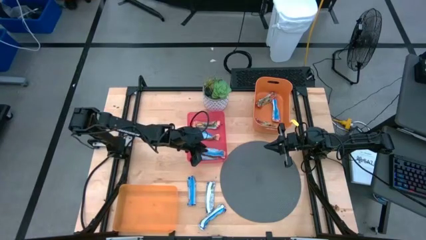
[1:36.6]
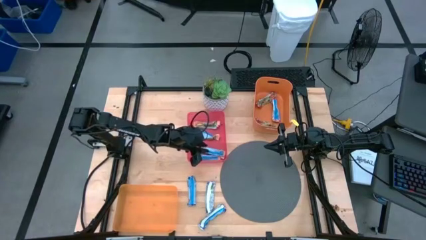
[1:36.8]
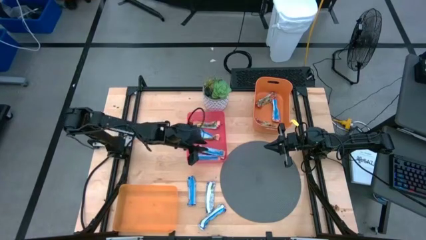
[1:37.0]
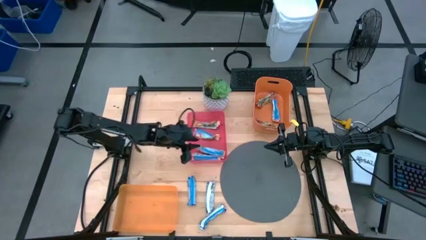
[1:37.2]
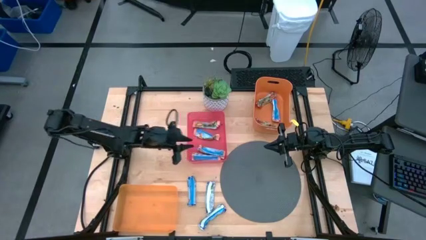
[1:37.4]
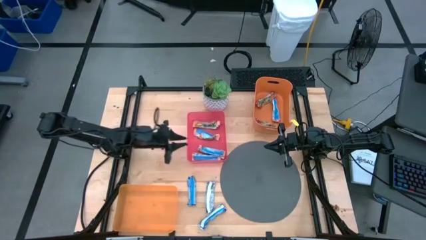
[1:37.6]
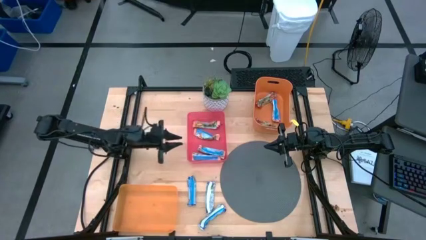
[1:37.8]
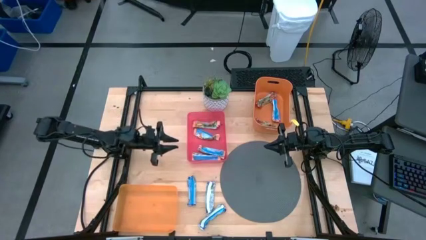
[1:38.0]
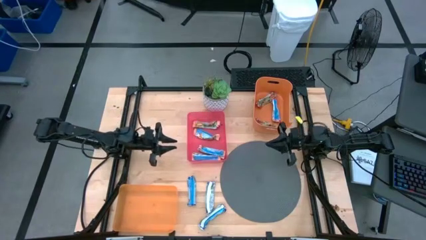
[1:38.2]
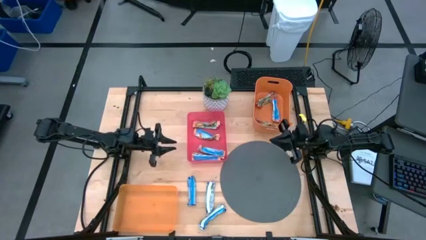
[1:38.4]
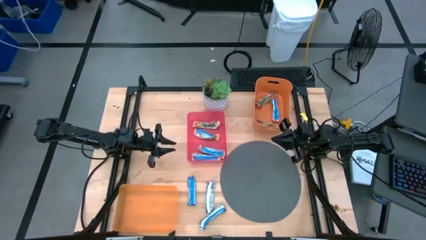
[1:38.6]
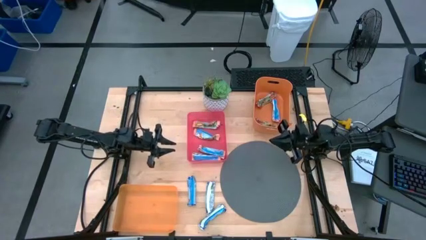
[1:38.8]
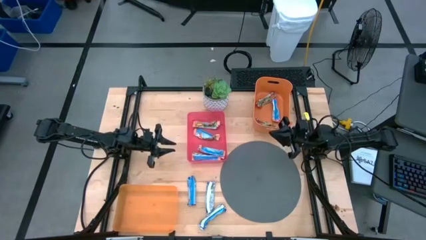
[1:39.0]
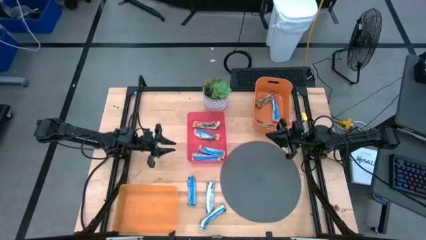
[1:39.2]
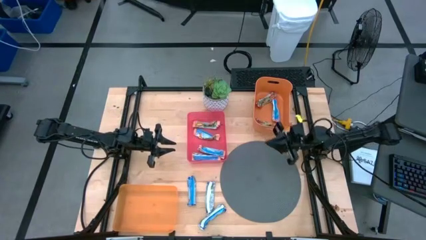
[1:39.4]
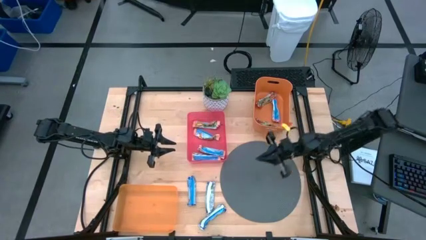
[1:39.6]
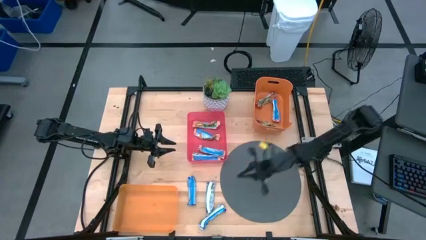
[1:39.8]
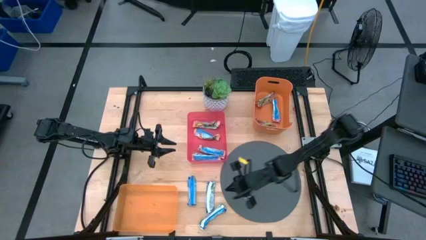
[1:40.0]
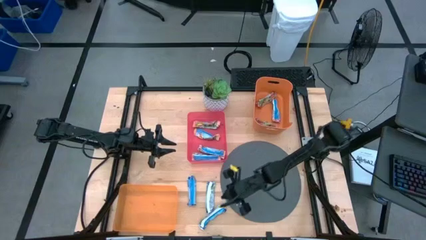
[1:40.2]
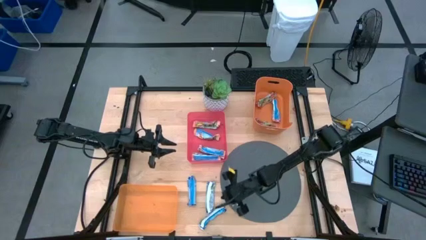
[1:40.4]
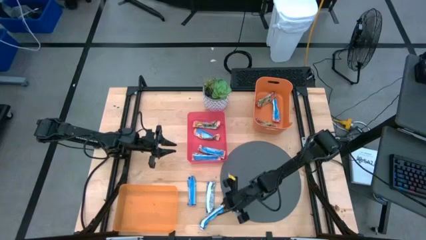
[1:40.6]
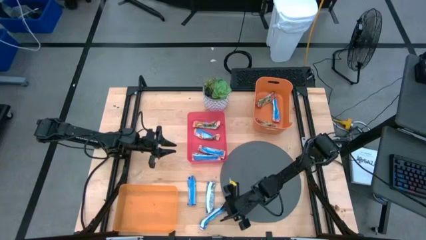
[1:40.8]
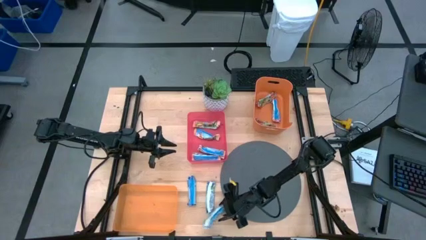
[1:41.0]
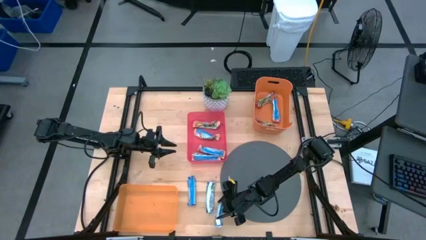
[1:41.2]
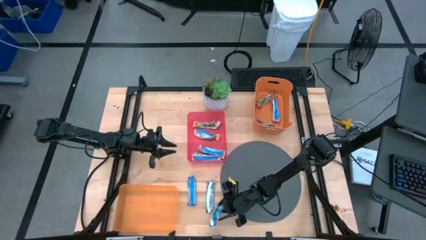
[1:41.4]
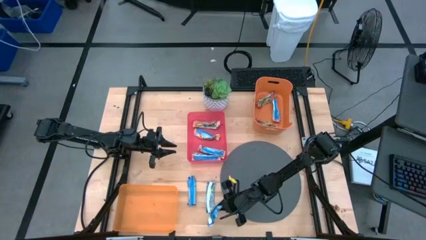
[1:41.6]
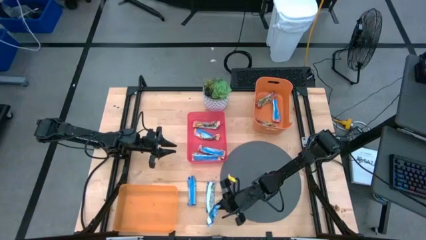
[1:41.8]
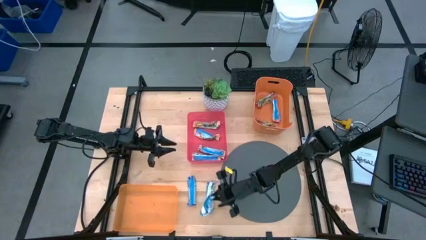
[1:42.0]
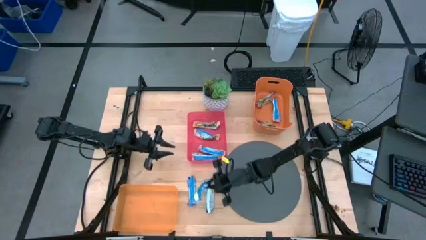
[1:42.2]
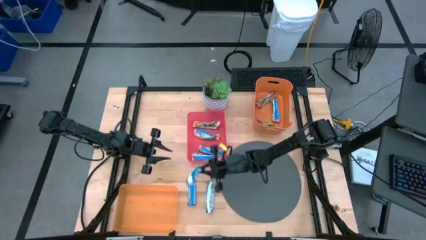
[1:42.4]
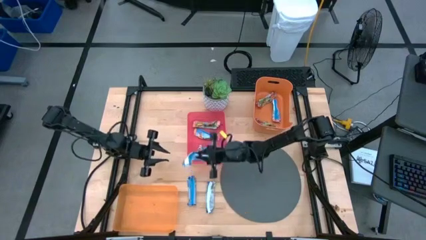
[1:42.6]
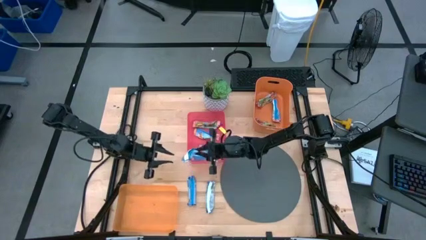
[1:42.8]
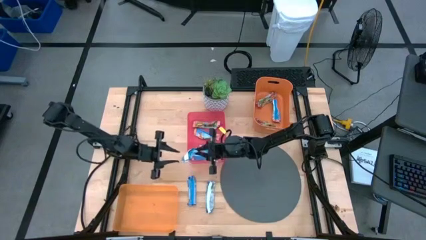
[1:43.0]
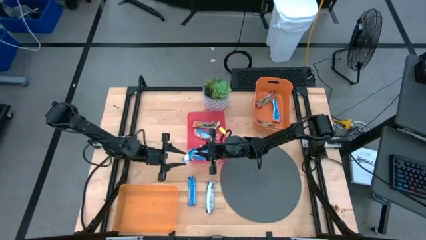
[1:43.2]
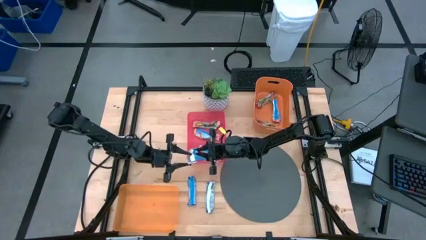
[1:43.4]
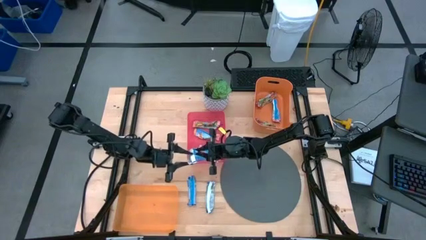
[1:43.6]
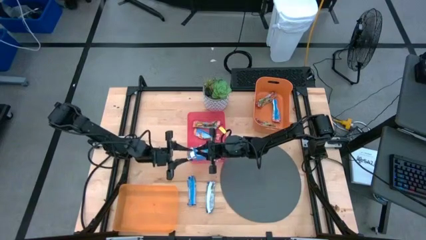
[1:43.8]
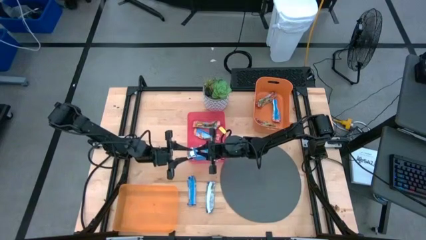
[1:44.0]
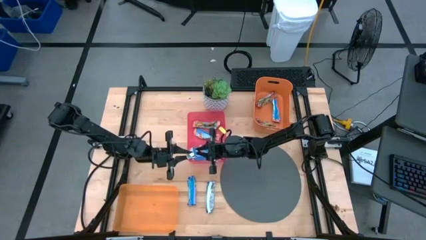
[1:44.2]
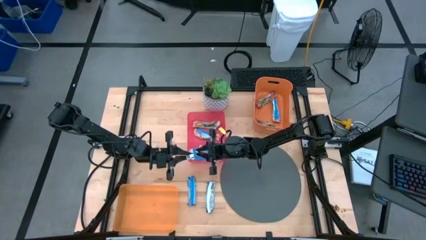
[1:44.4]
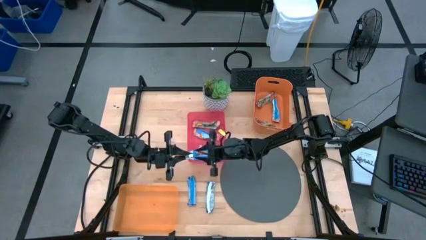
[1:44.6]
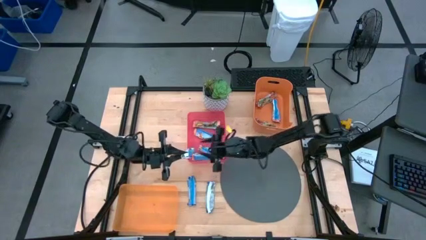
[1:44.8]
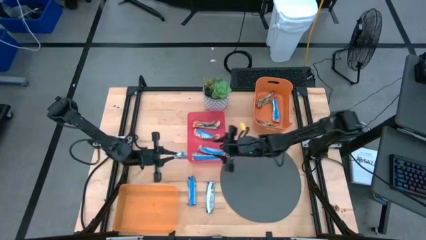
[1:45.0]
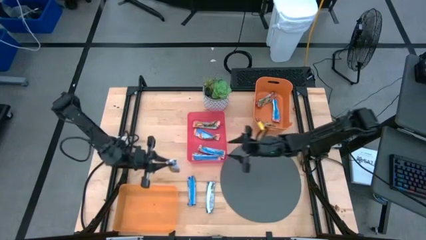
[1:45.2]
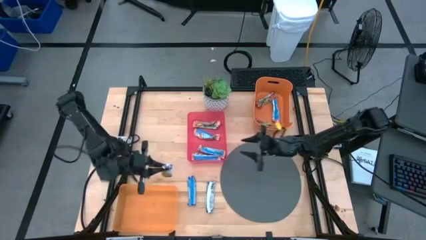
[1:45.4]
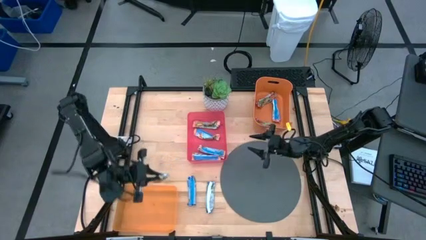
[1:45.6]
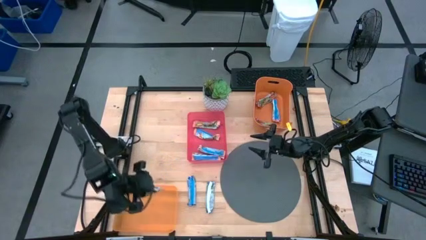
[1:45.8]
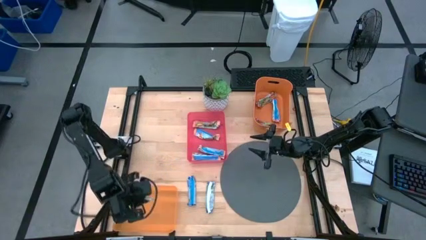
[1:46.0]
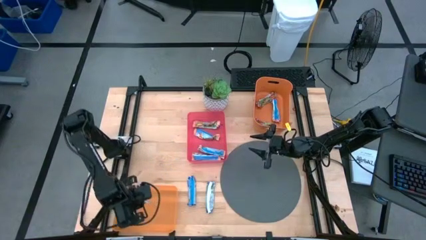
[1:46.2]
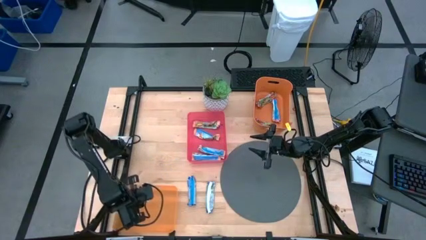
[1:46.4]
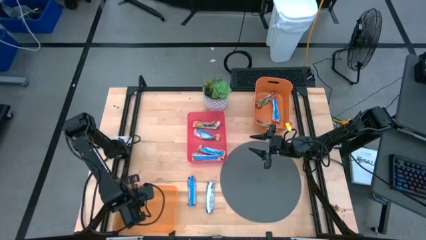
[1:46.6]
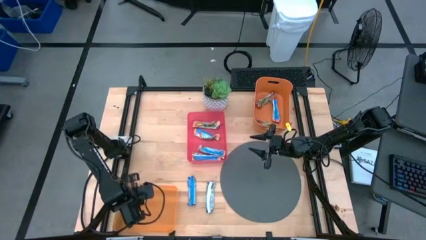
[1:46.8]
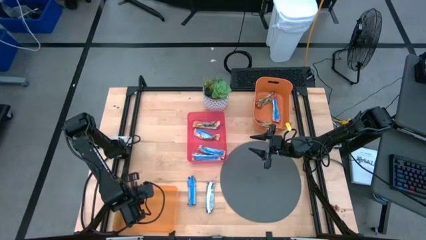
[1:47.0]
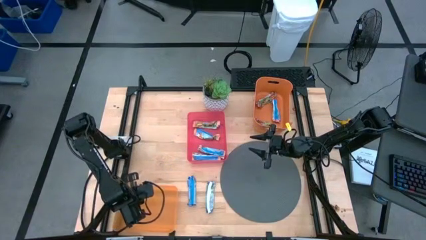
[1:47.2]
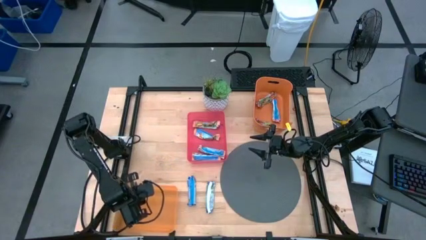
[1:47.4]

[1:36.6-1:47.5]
Task: Pick and place Granola Bars by type
Put the blue/orange granola bar into the pink bin

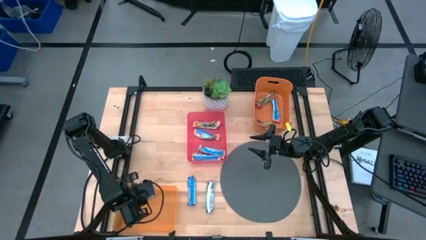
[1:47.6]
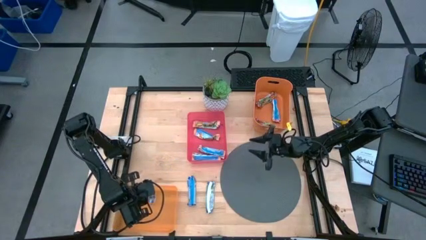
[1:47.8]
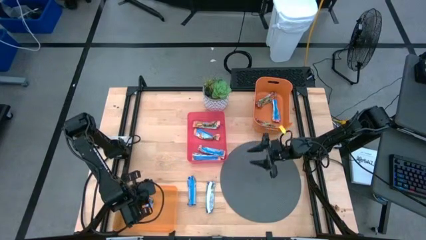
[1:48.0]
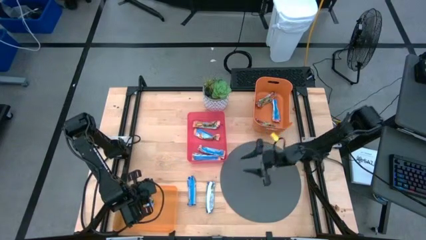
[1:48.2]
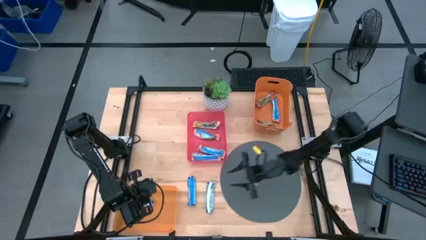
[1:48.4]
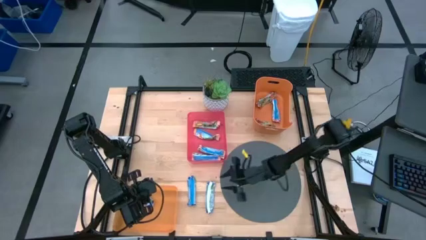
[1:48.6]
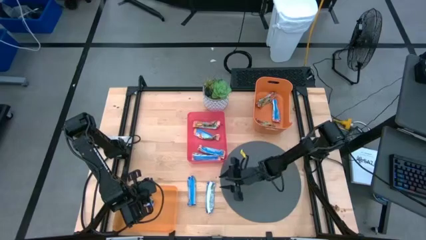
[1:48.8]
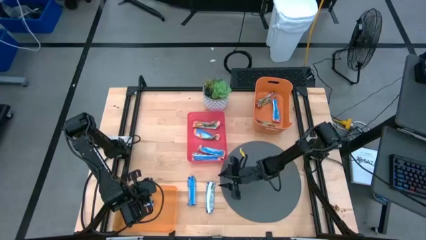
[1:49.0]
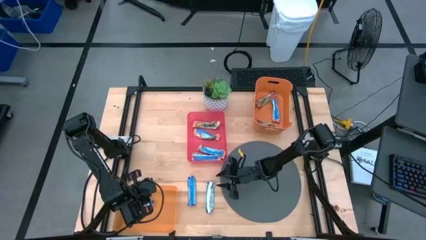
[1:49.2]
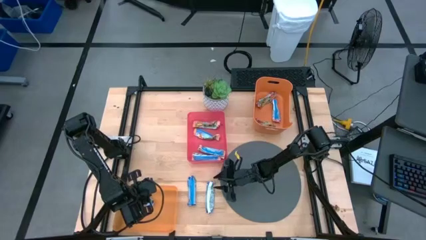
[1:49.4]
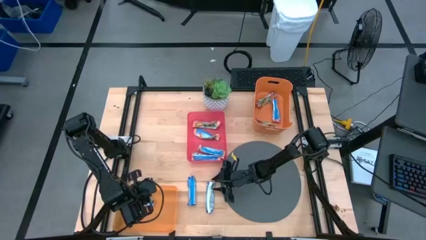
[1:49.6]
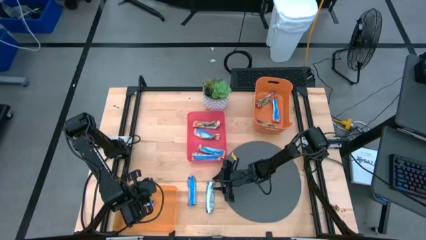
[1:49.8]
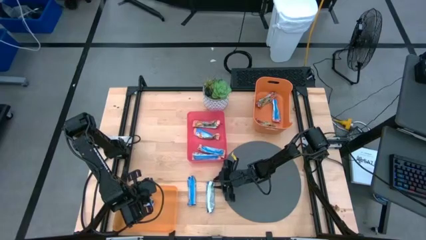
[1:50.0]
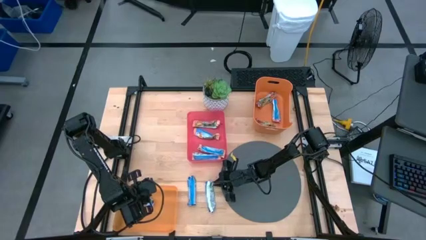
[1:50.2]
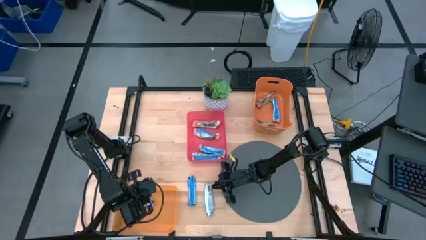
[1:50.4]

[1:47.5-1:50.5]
Put the blue/green granola bar into the bottom orange bin

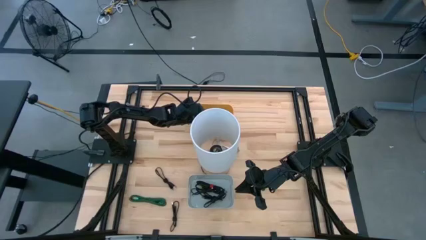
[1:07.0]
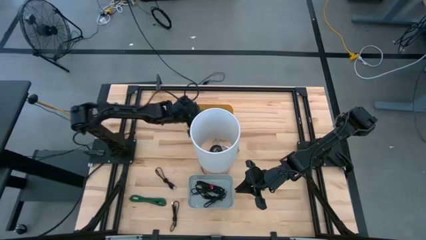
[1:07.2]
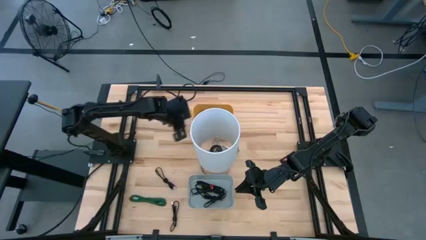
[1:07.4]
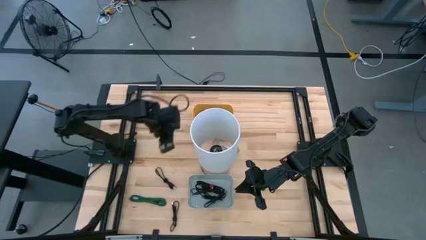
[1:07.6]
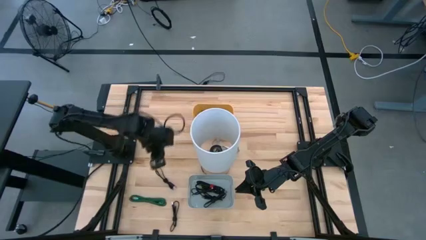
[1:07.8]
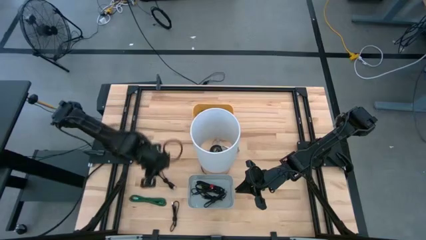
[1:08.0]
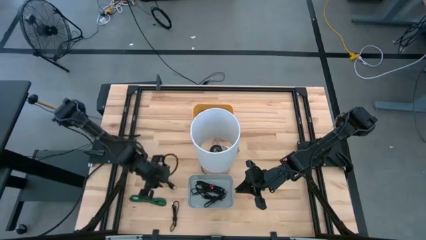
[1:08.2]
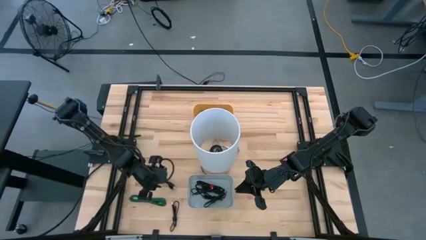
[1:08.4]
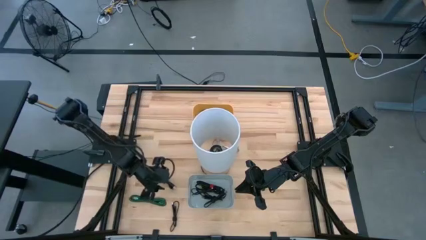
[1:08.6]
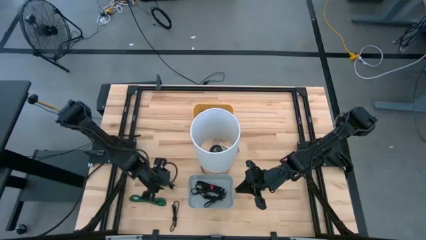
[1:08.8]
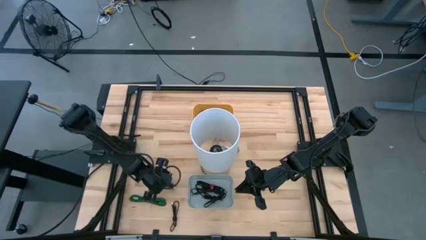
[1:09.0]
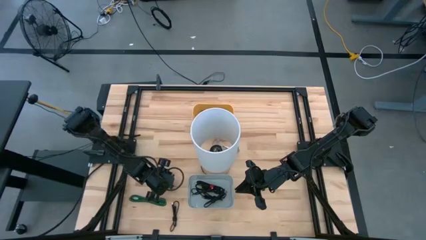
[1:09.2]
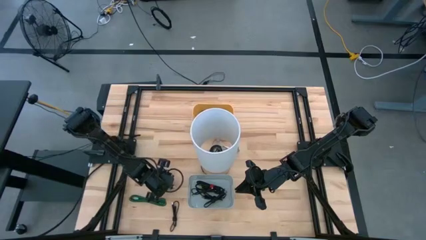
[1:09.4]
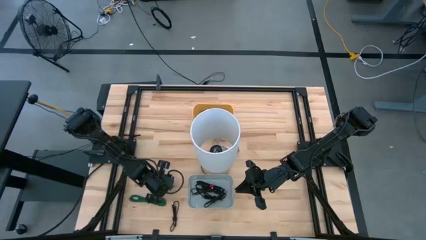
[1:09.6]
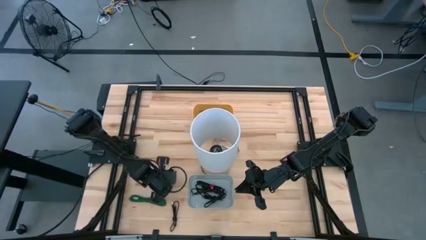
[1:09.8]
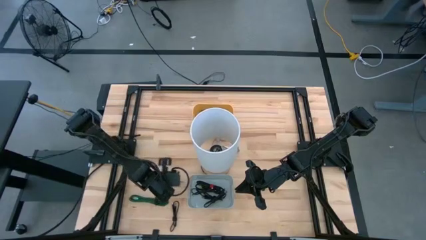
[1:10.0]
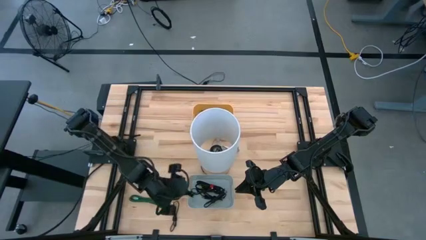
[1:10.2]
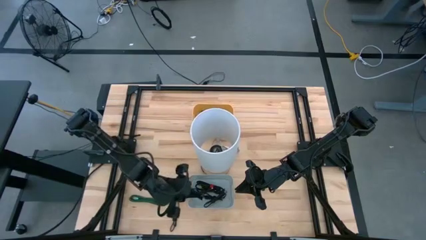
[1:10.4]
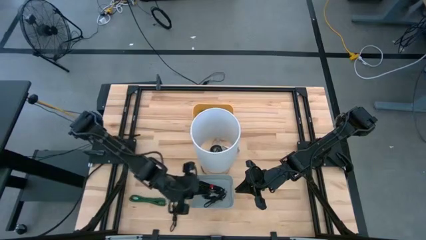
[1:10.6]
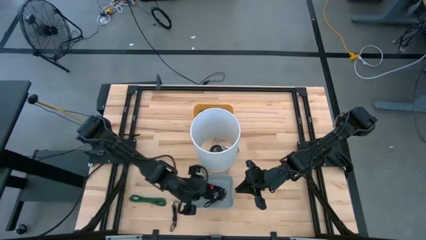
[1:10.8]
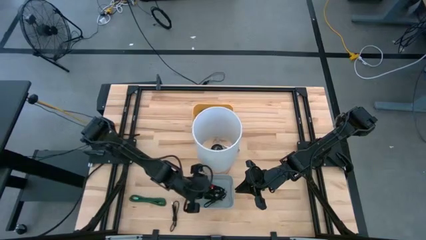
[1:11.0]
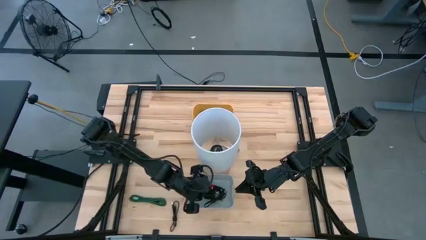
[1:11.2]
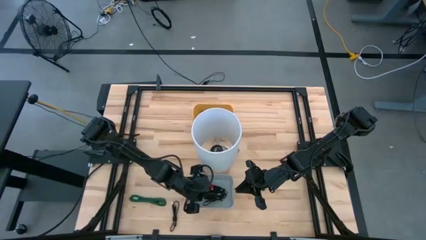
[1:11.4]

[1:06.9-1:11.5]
Task: Pick & Place USB Port
Put the black charger cable into the white bin
